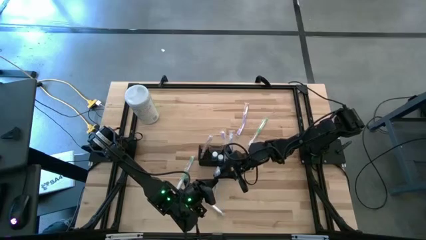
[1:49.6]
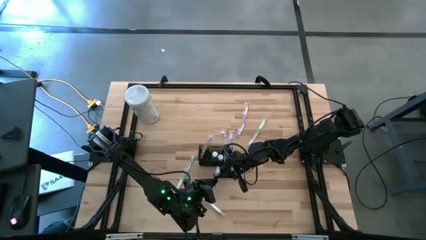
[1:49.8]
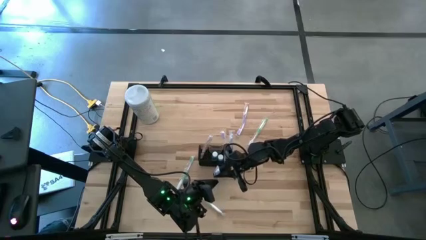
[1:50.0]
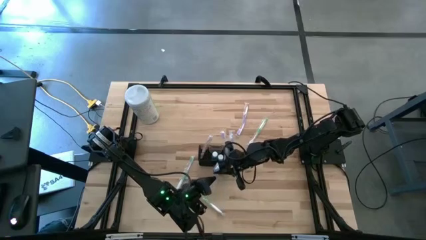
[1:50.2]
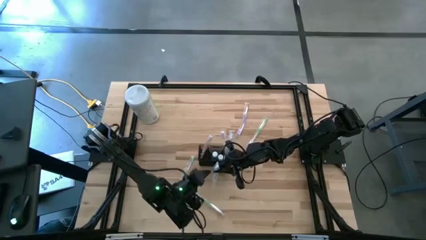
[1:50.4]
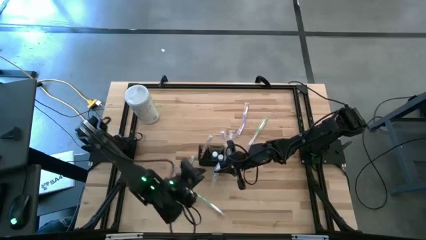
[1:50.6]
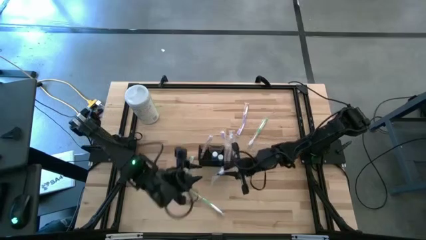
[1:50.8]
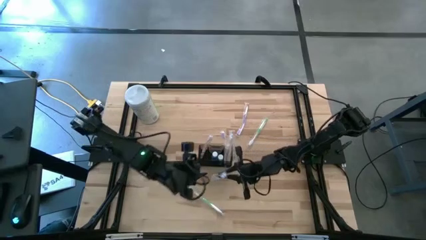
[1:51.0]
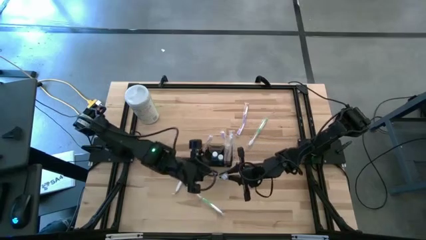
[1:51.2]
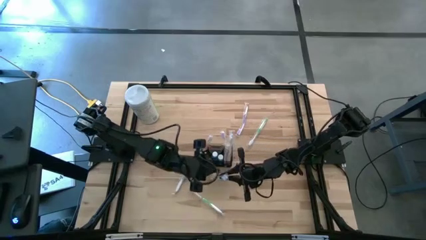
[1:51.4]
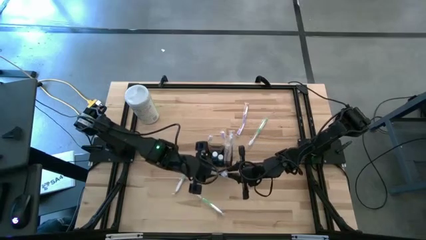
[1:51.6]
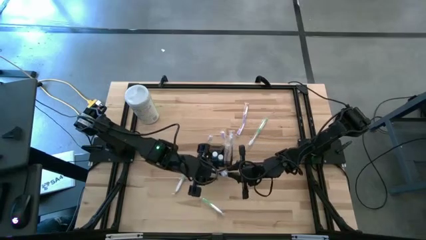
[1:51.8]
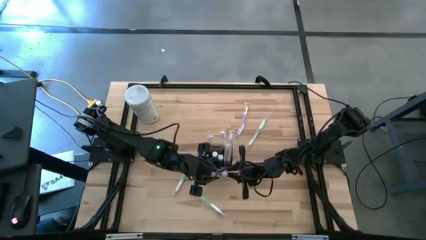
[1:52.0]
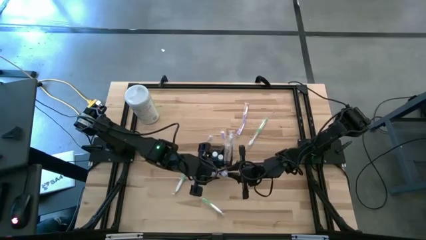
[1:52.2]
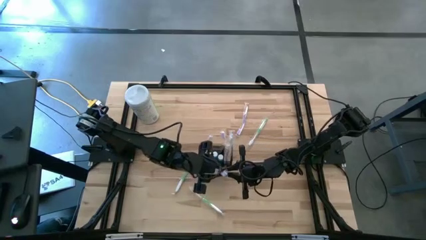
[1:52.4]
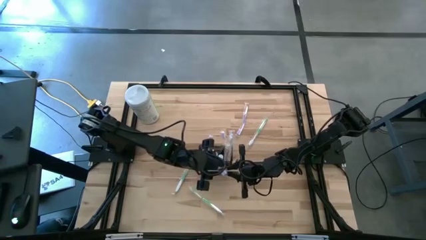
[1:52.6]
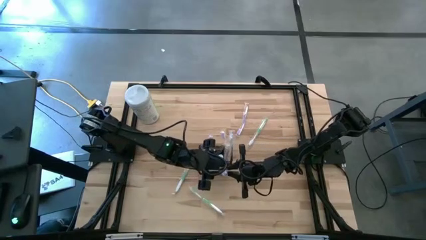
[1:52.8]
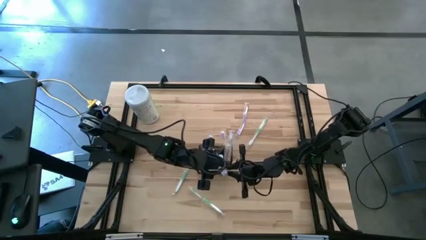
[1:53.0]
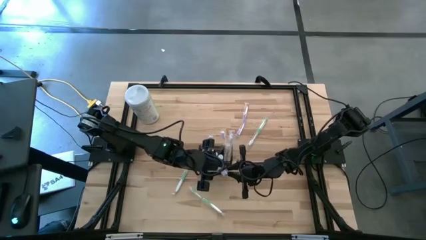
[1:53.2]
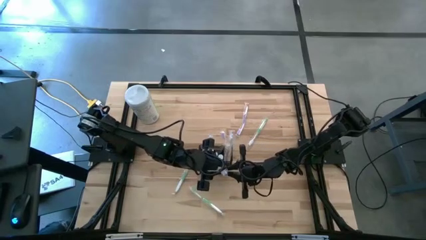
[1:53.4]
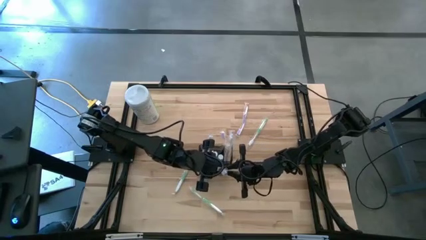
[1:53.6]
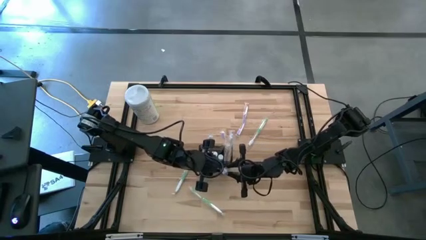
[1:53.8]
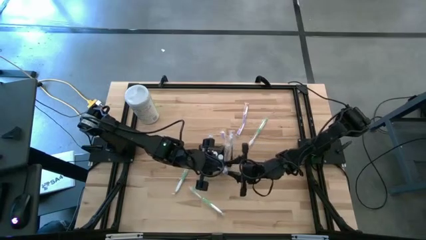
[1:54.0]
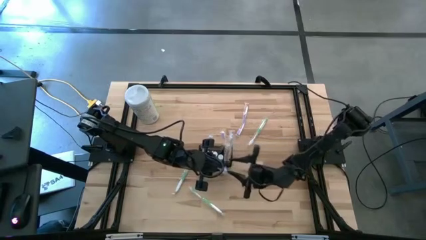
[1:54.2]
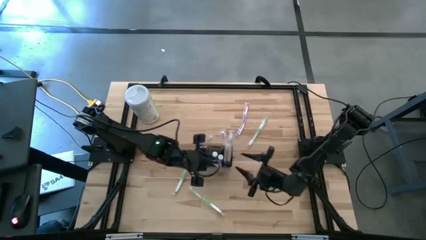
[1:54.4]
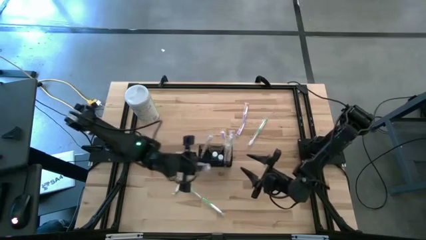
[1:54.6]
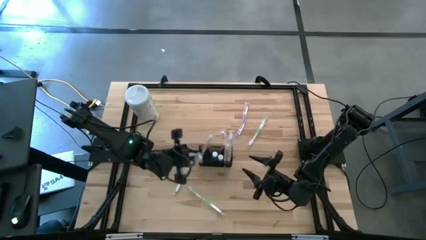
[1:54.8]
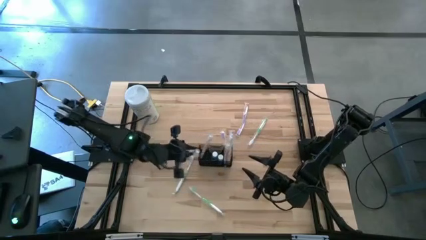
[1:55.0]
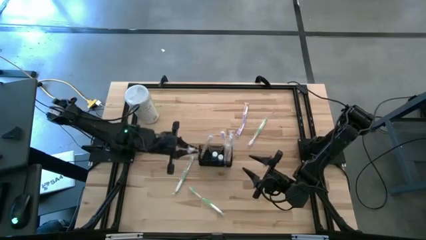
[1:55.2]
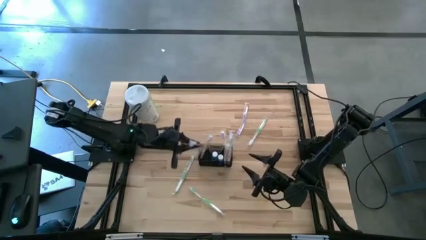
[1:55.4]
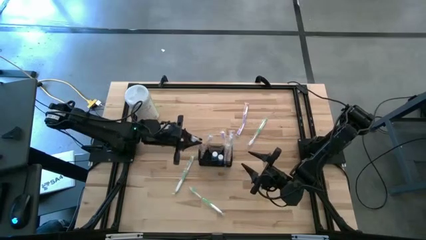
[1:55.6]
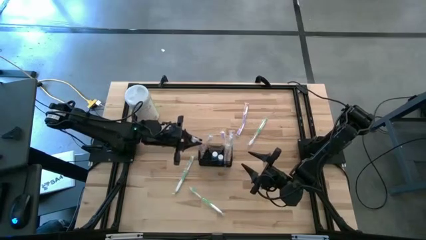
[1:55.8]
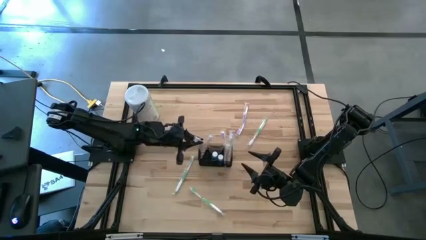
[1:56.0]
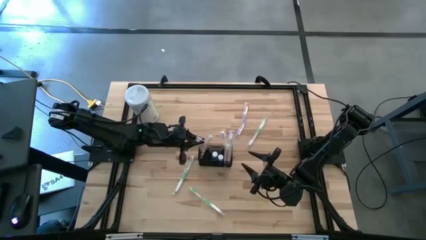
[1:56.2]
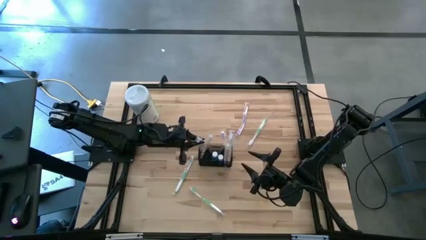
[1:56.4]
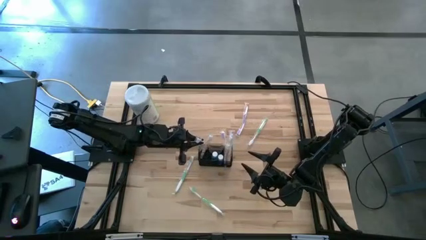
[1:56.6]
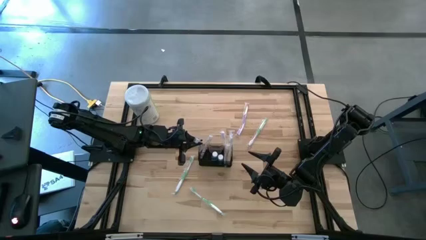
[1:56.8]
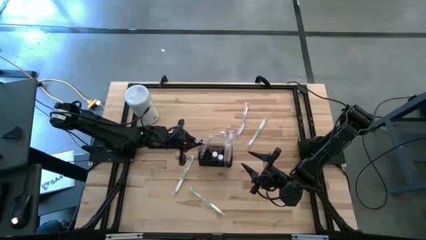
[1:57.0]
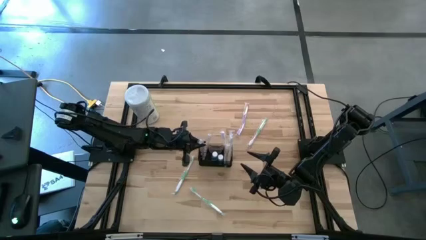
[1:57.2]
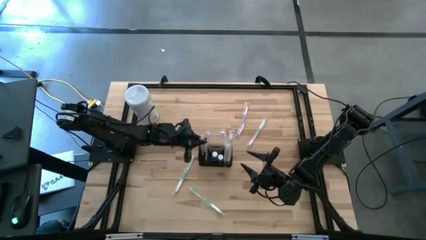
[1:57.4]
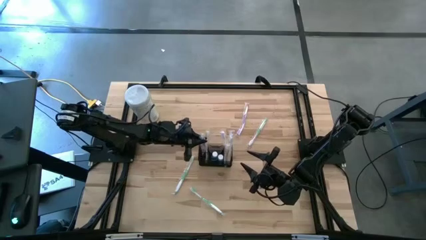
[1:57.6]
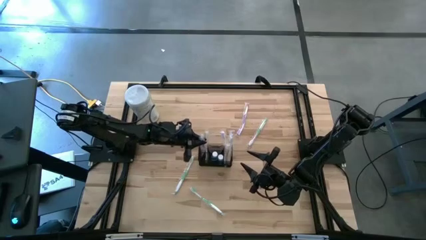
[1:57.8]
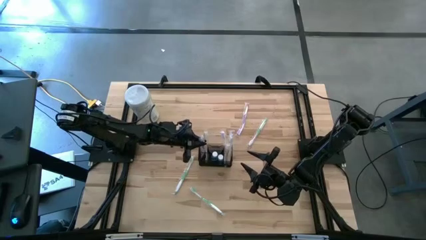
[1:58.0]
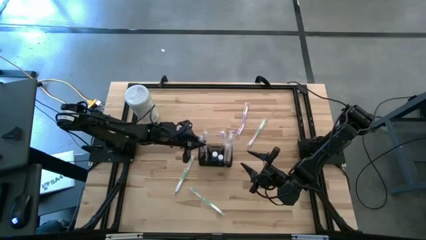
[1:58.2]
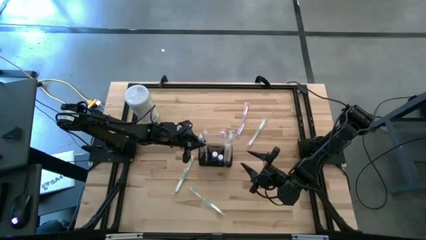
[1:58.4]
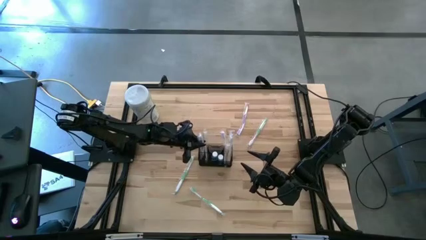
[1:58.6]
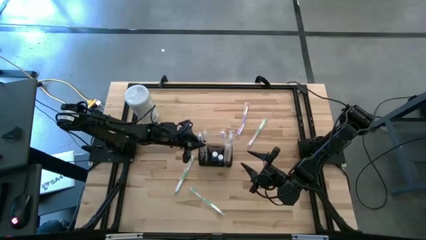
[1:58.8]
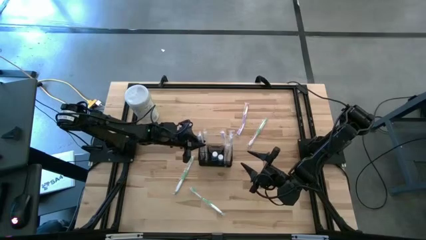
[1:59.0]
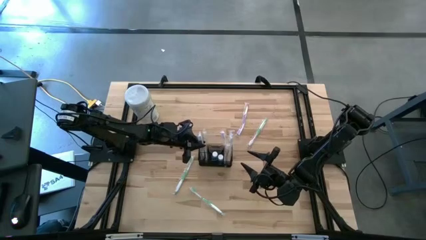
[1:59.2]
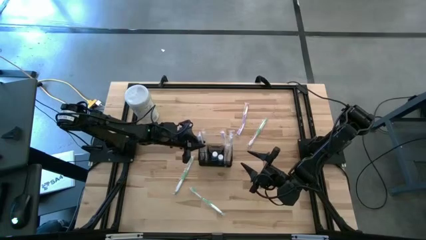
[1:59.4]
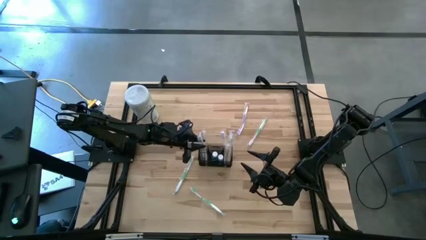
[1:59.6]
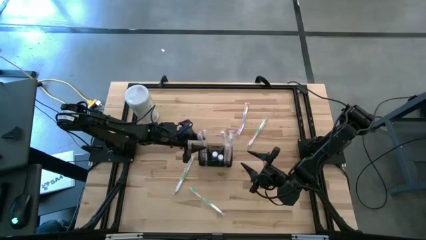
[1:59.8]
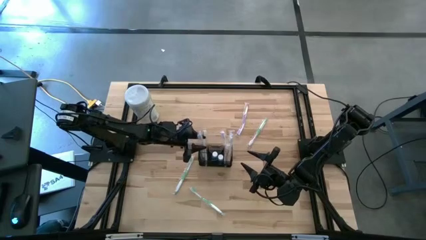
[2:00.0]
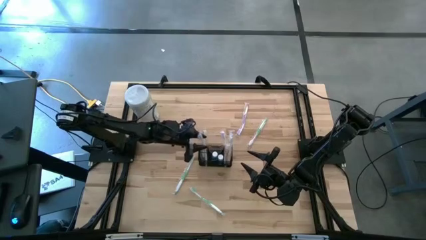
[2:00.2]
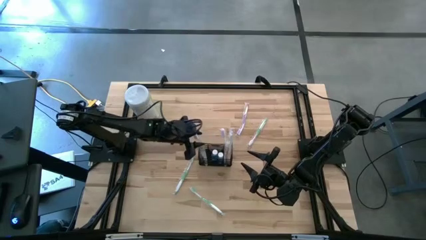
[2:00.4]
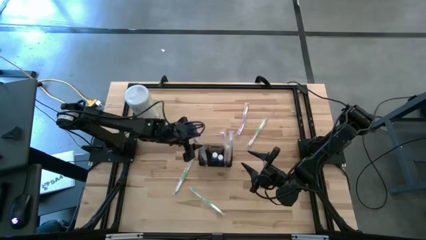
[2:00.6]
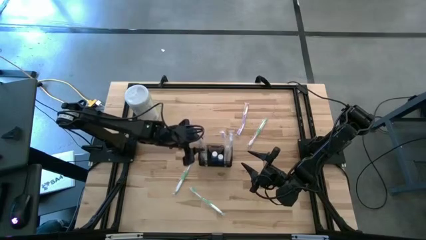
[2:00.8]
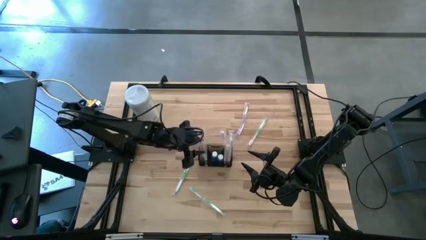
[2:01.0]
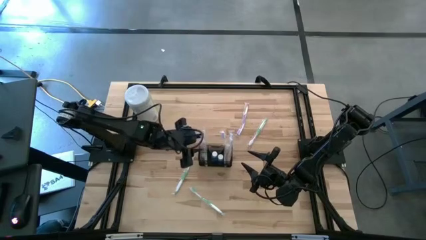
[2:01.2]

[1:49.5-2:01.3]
Task: Pick & Place toothbrushing station
Put the blue toothbrush into the black mesh

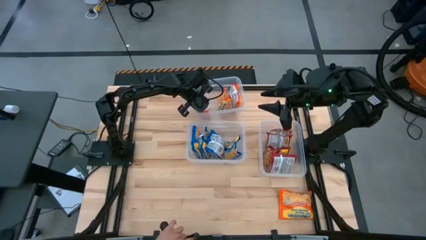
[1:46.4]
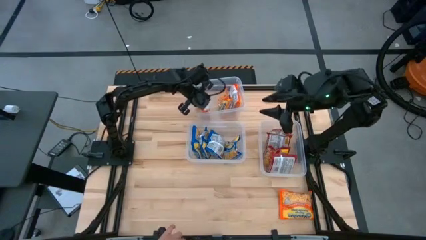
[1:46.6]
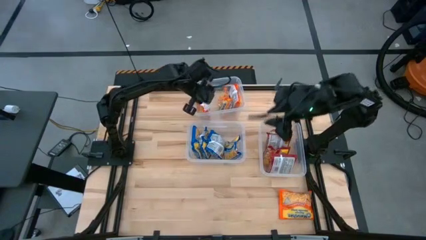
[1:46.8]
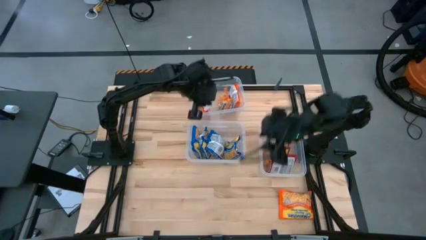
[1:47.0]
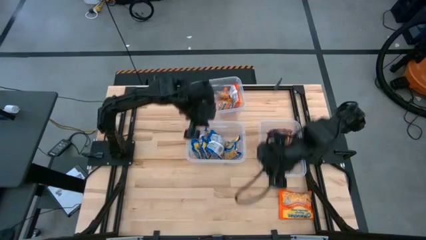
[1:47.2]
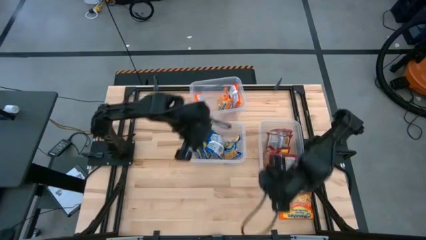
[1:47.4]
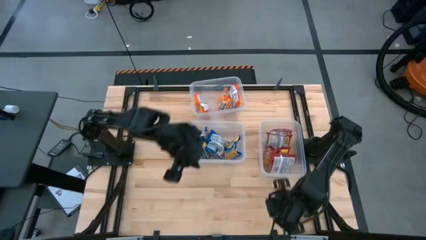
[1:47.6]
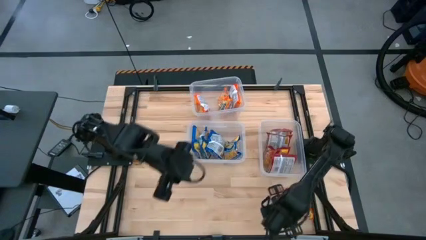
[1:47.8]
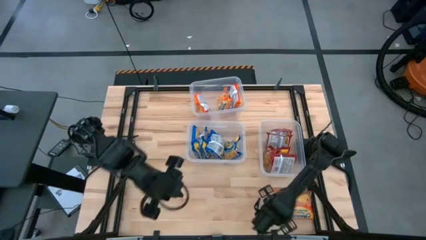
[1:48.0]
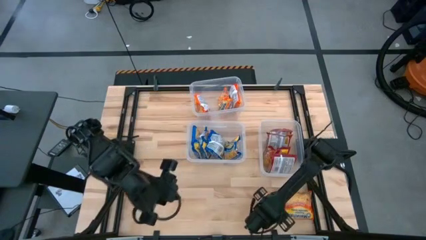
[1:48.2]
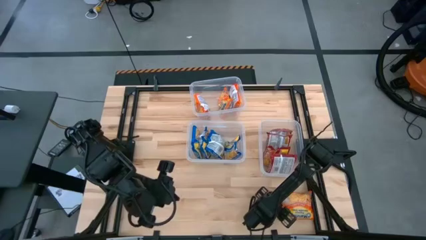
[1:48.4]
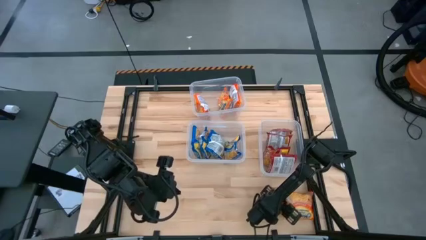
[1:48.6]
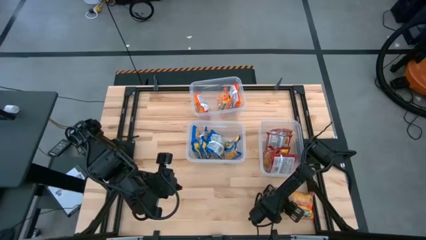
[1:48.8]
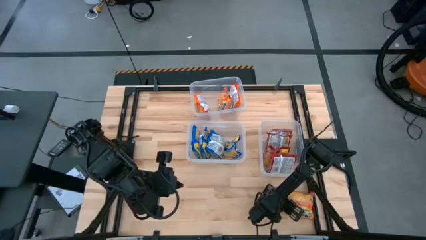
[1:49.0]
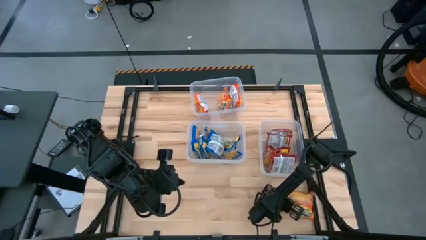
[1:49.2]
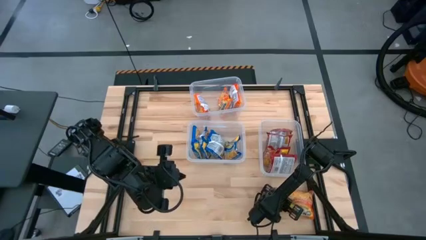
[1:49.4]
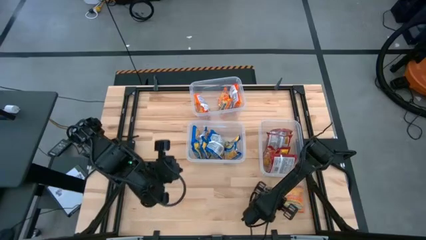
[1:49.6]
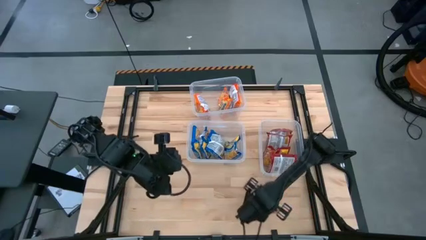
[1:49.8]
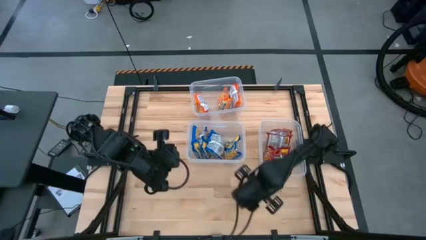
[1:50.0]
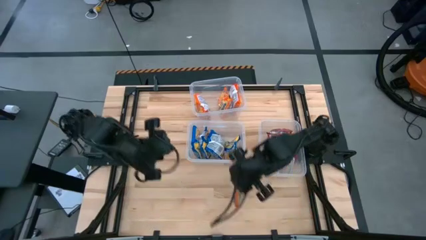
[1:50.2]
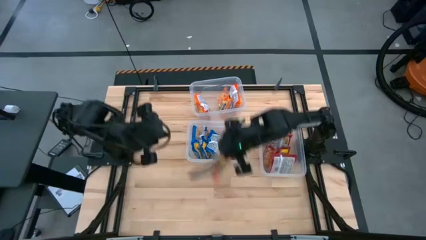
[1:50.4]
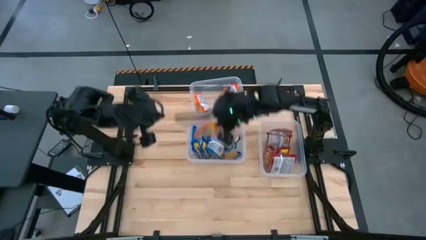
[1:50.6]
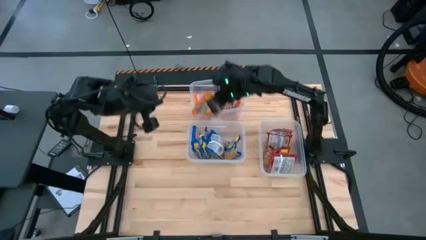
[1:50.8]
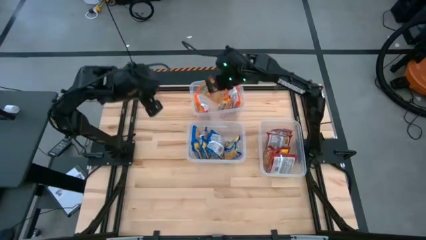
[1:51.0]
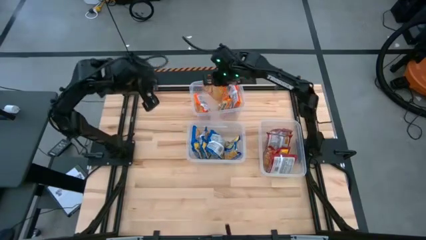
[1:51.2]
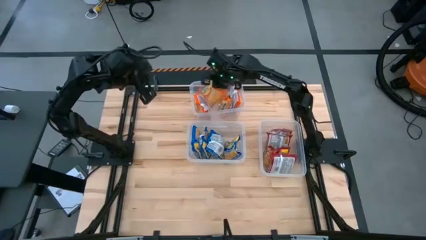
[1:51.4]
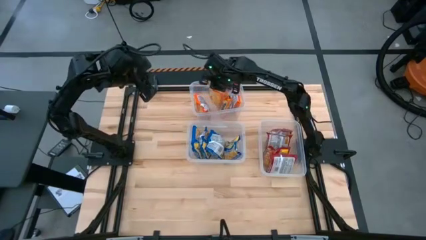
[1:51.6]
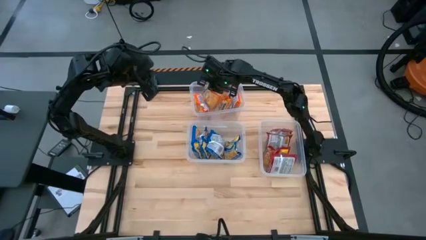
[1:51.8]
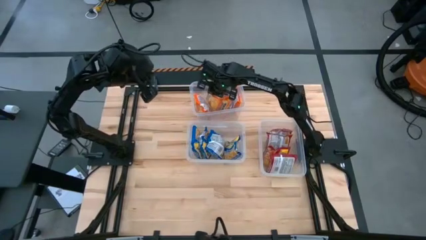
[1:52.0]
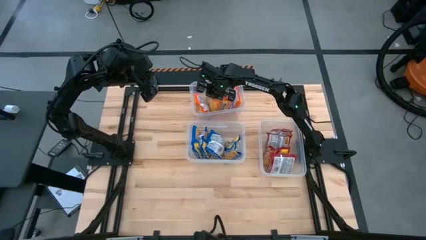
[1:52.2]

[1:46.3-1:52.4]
Task: Sort Maruchan noodles
Put the orange noodle pack into the top transparent bin
